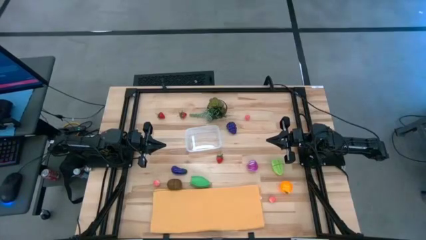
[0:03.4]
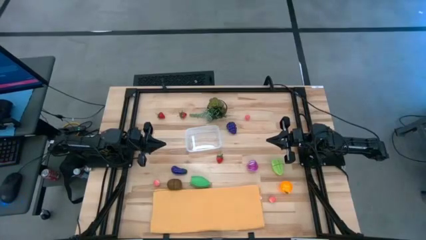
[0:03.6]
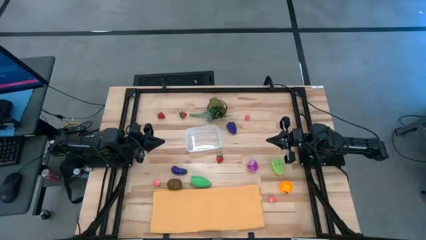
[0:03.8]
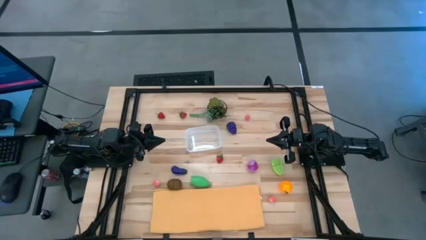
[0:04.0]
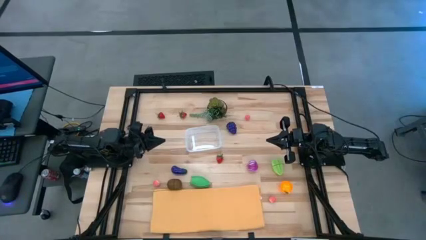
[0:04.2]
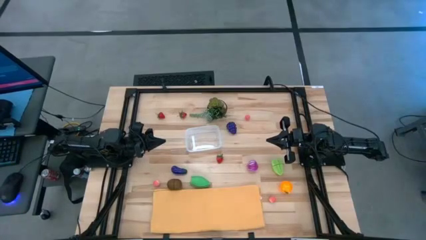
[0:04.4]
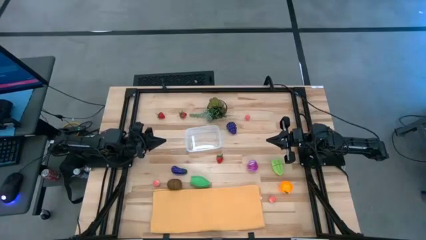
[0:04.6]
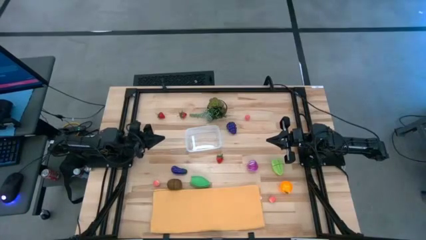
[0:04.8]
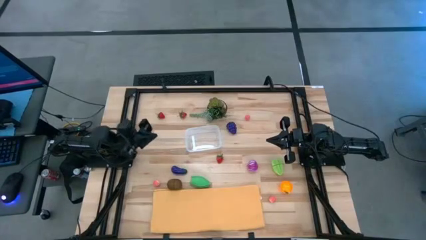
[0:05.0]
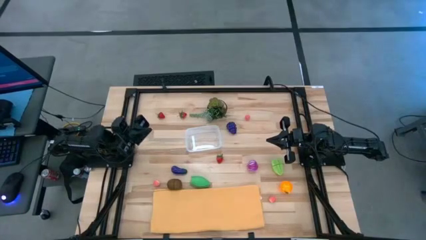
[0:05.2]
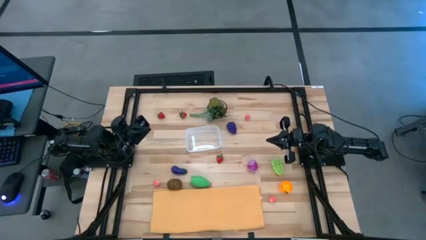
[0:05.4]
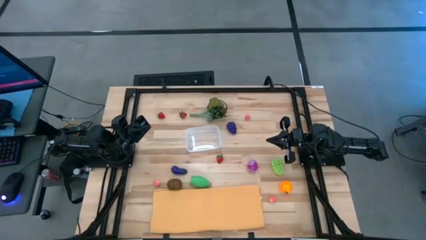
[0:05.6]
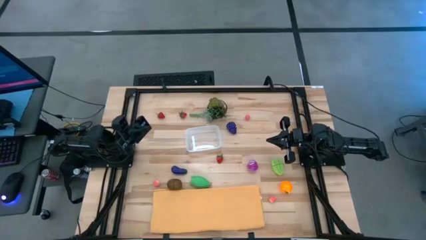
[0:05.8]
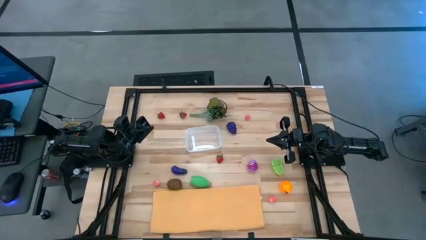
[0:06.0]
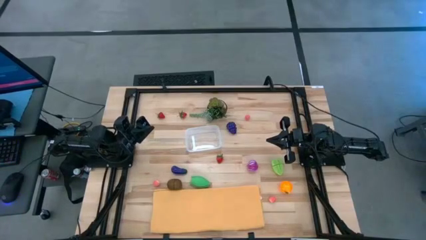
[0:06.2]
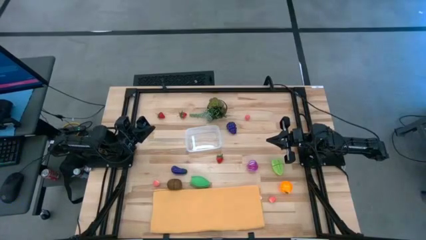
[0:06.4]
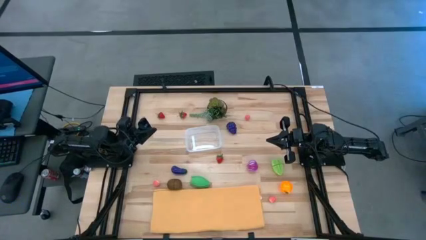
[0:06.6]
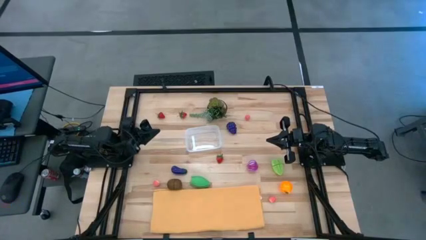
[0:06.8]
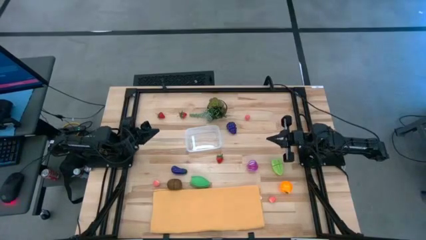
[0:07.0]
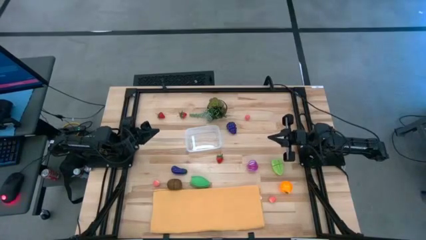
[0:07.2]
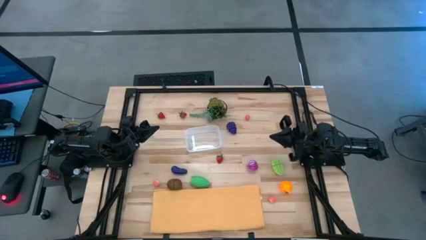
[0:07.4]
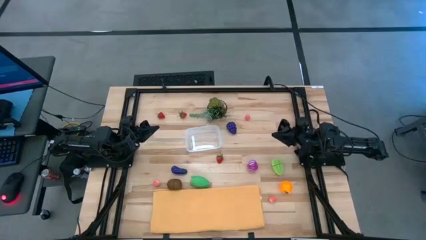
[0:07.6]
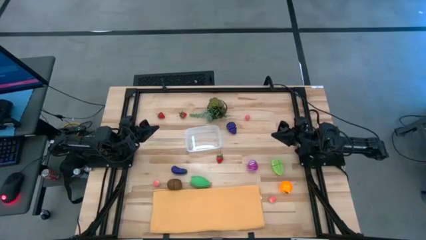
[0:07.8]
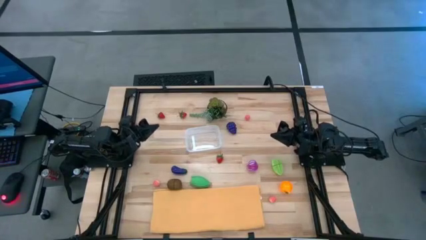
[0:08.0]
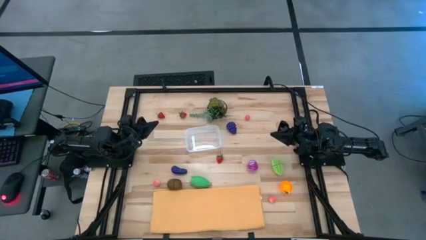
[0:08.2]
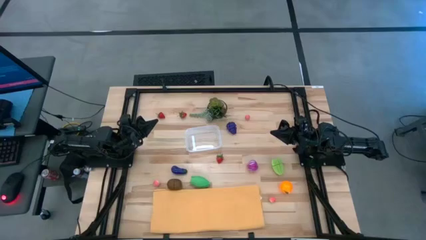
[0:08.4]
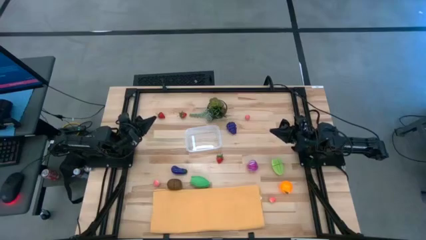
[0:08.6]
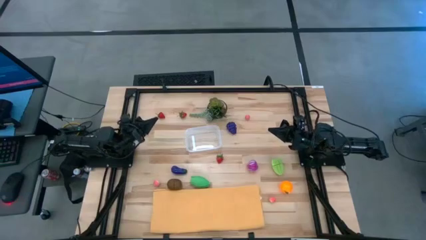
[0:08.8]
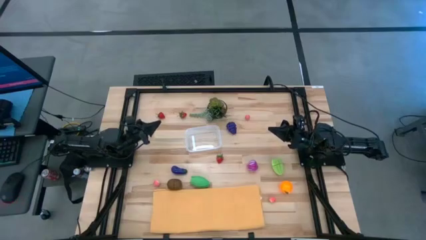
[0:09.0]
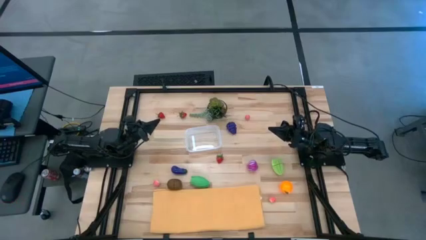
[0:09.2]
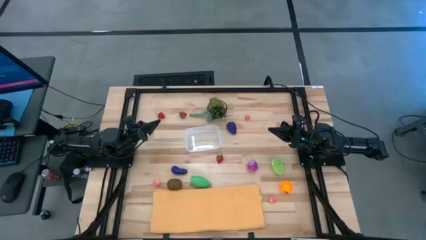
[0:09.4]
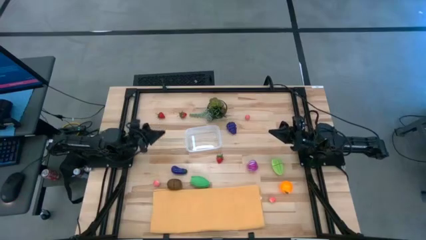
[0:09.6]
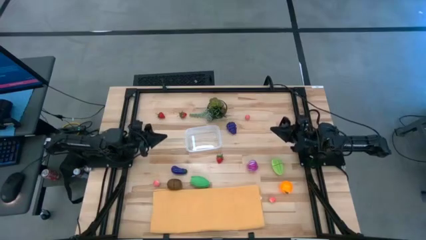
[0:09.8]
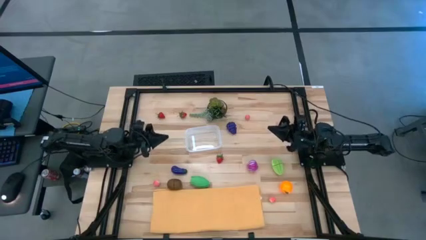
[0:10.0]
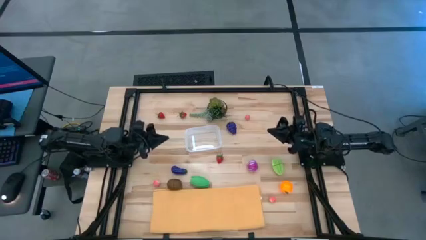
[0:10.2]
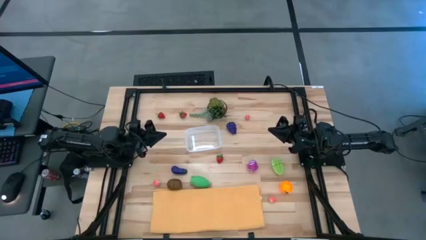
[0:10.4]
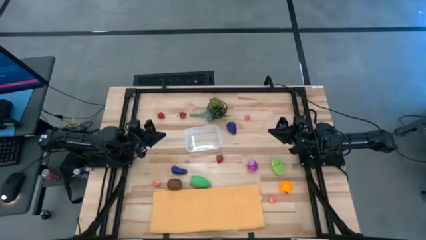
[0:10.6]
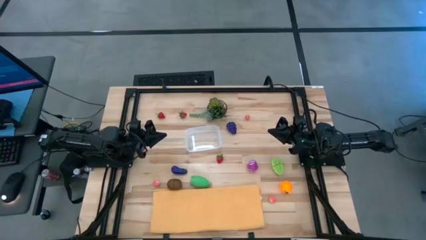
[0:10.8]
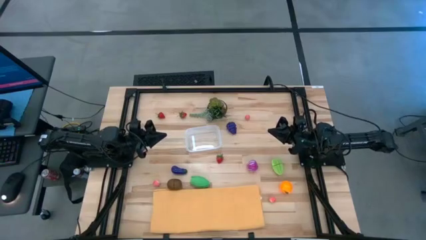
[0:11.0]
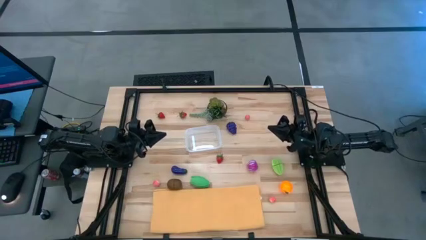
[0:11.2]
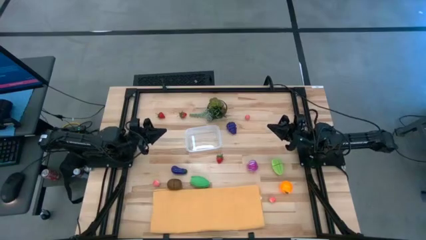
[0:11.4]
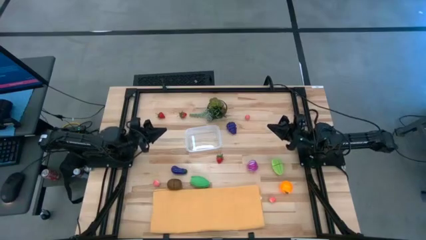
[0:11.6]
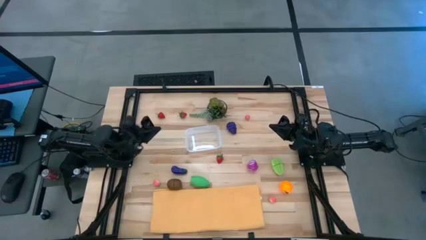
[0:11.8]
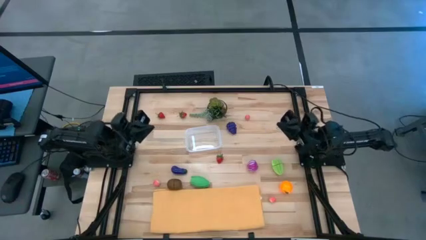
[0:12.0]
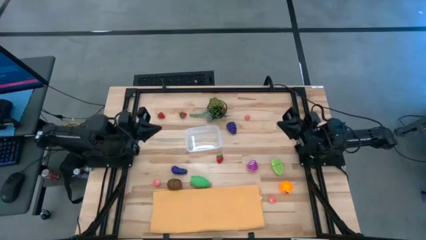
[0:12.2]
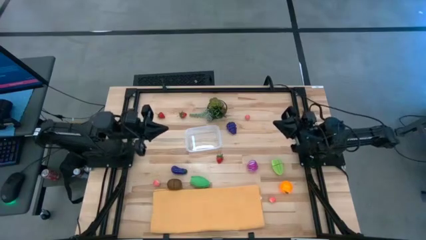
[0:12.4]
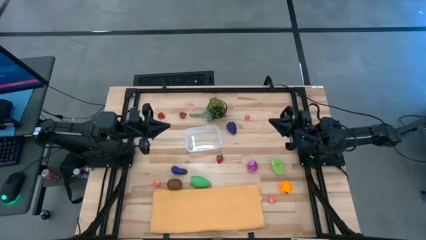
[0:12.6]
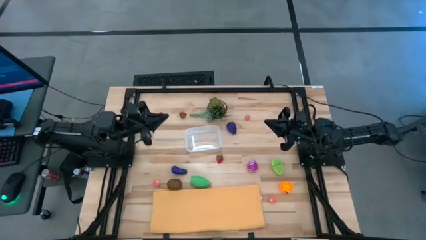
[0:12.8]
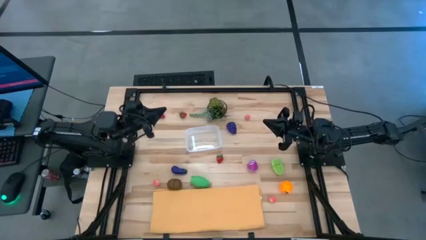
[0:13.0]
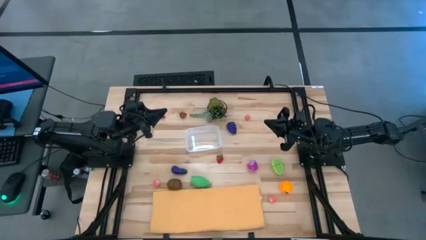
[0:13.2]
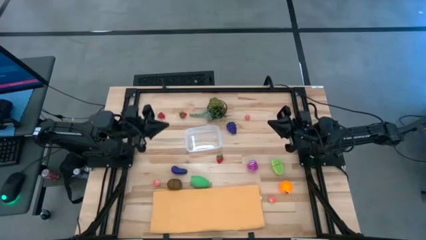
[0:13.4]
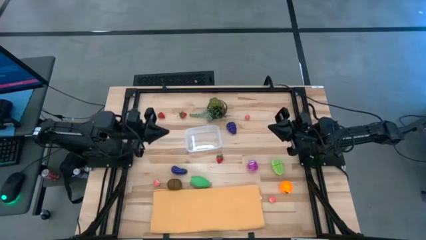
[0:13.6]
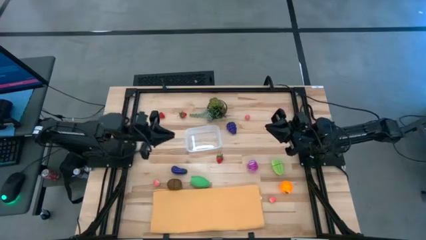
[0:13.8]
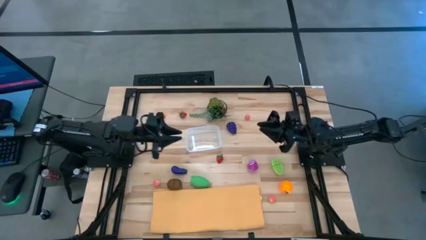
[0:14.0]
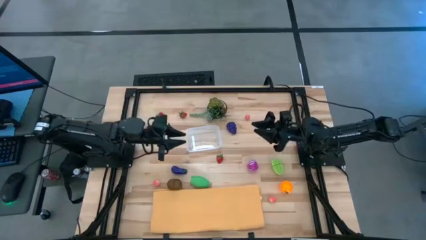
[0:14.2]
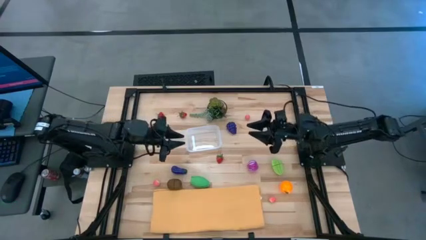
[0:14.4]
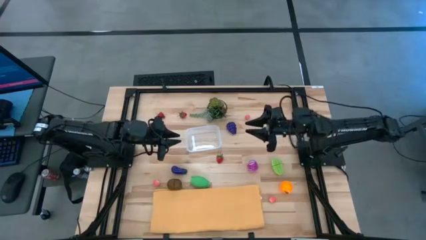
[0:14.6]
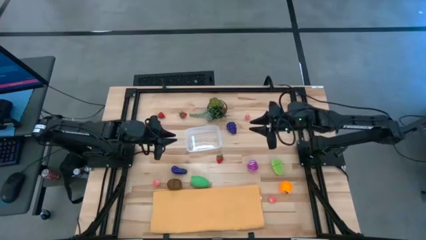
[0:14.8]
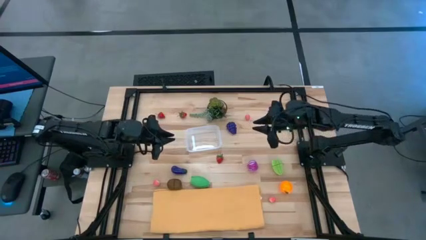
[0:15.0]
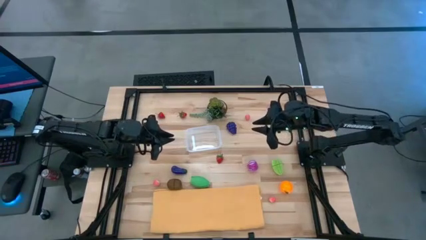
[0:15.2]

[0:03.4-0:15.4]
Task: Pick and placing Produce into tupperware
Put the top right pink peach into the transparent bin

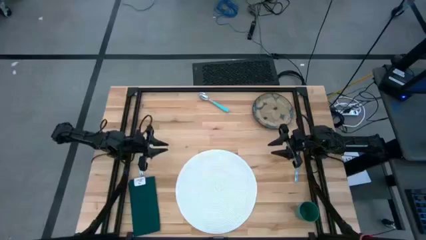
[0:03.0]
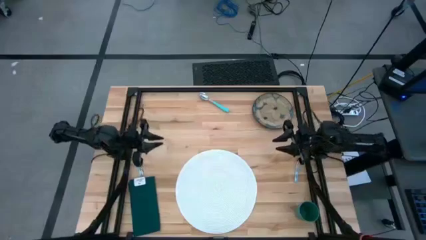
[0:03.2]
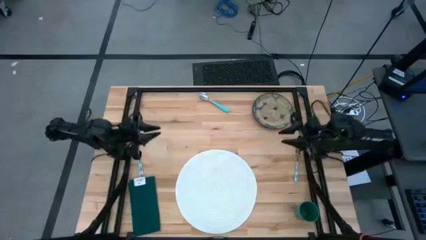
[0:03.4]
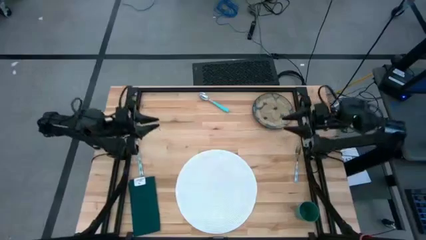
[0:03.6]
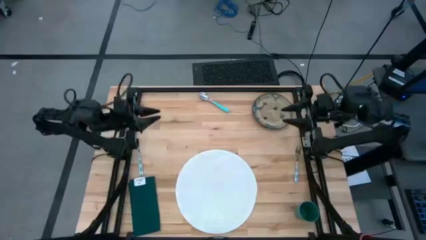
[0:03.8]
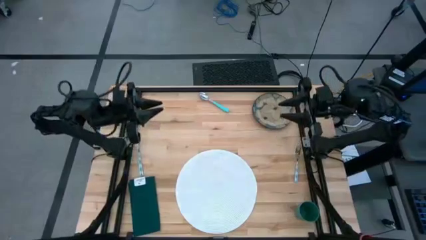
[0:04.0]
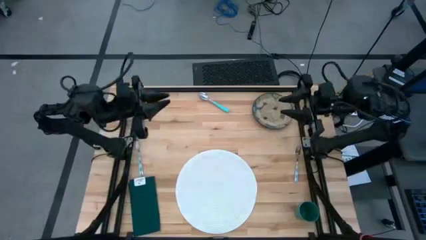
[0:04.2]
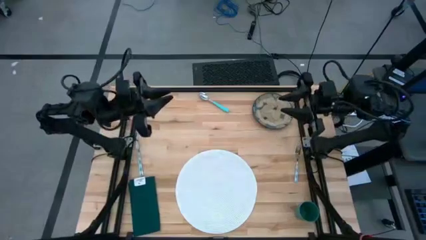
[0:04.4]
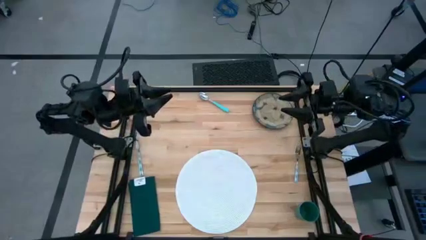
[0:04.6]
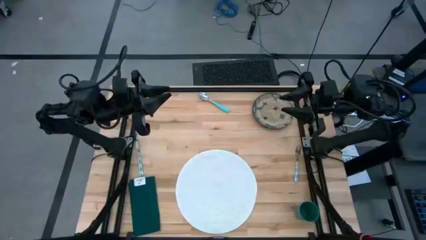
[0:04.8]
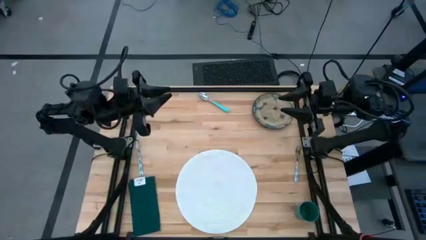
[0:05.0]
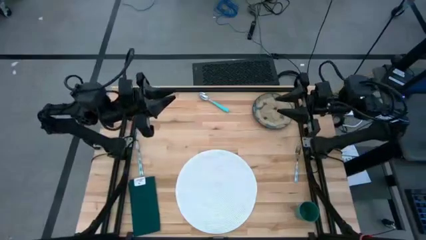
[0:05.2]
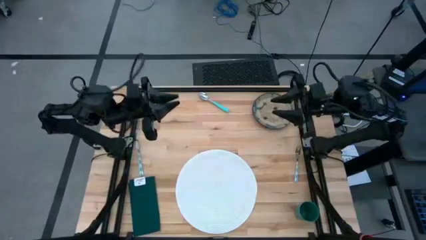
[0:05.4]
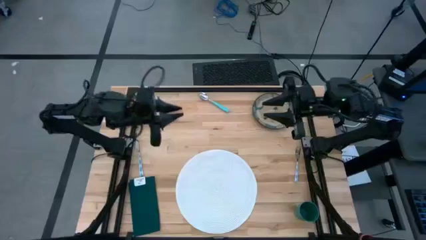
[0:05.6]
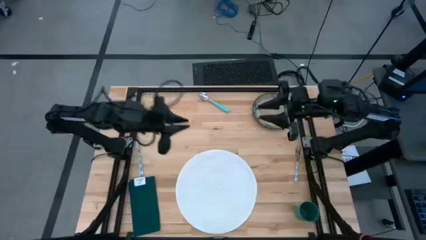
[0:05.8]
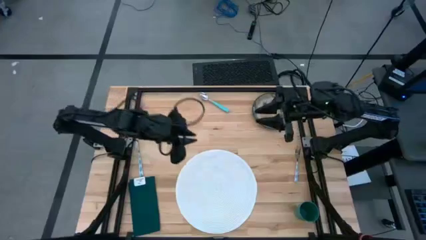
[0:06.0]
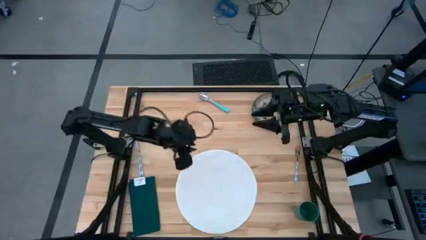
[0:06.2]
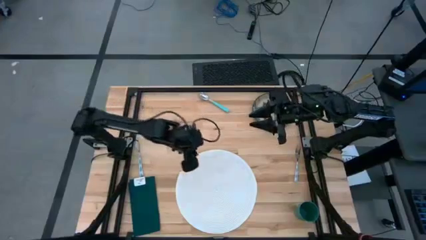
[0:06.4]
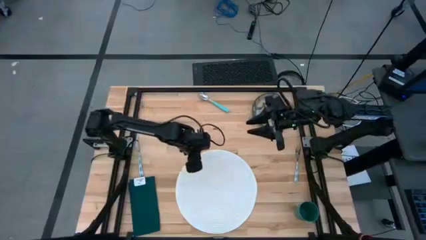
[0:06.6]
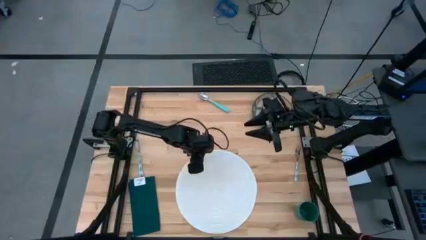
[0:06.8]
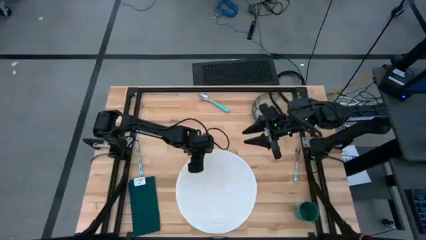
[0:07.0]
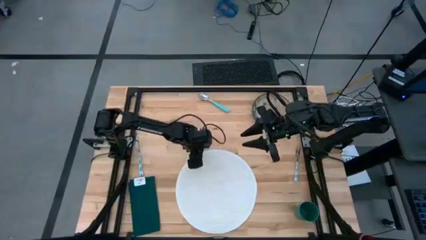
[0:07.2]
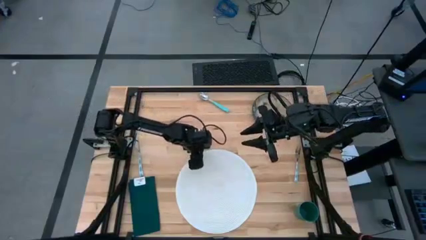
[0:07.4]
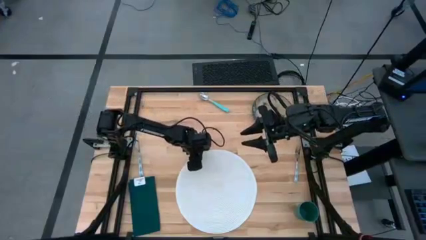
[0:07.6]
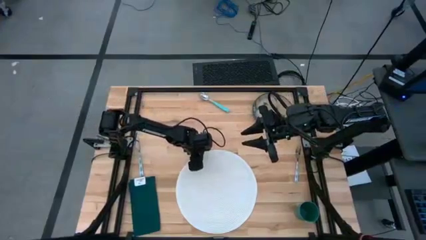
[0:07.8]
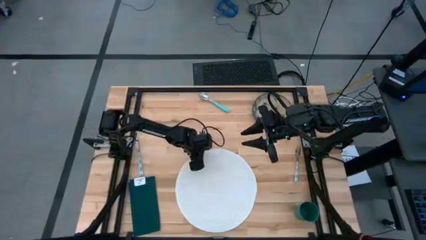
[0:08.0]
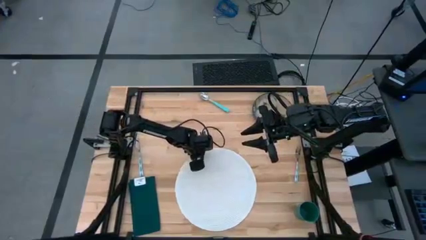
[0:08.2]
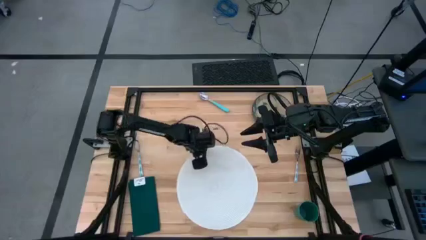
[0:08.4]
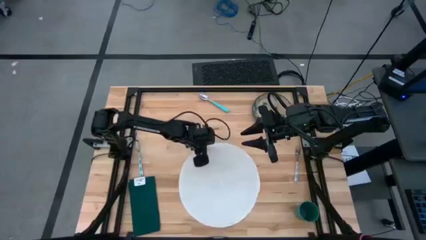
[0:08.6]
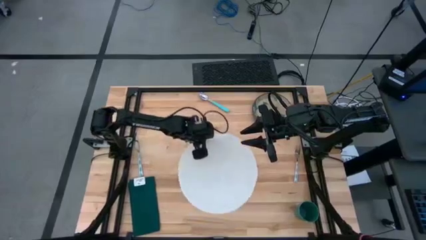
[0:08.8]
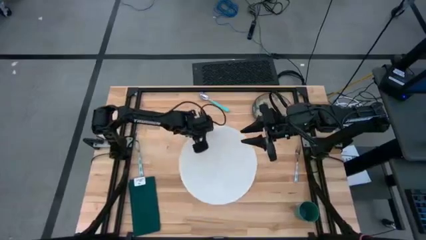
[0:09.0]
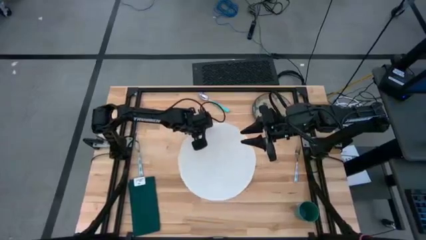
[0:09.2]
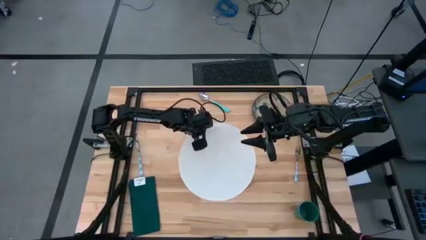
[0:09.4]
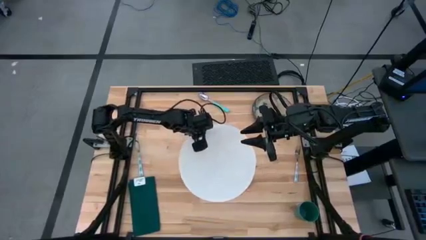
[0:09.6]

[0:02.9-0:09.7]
Task: Set table place
Move the white table mat to the center
